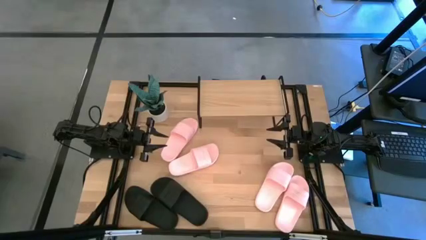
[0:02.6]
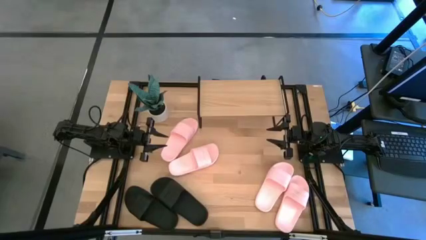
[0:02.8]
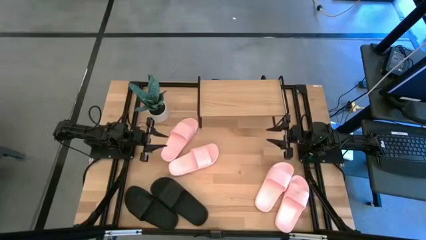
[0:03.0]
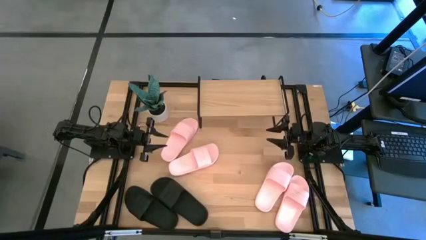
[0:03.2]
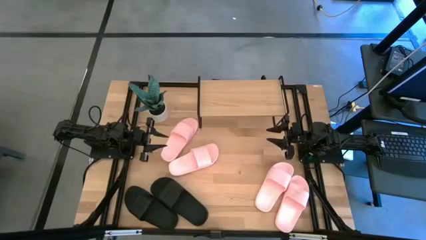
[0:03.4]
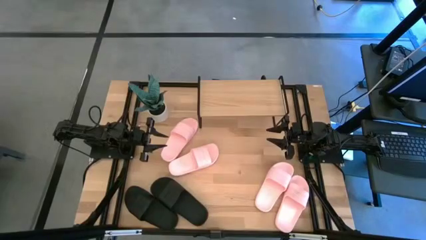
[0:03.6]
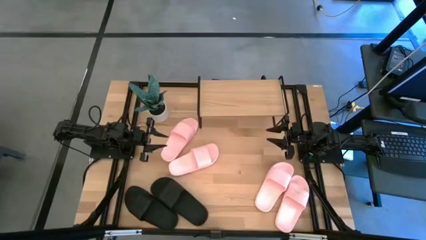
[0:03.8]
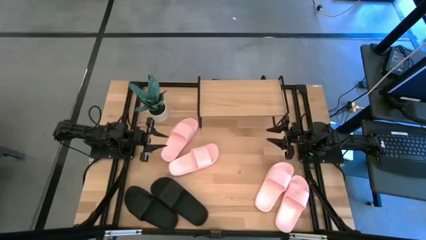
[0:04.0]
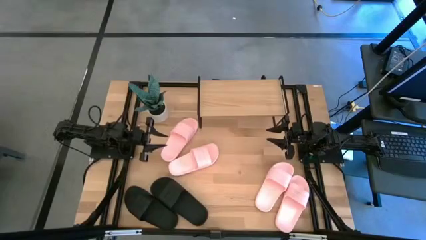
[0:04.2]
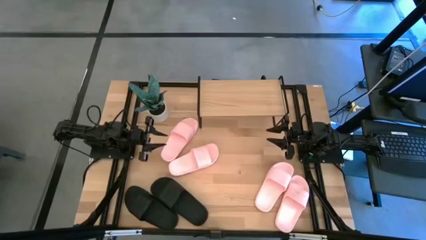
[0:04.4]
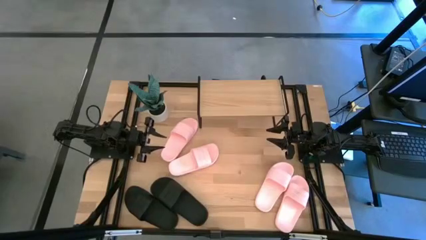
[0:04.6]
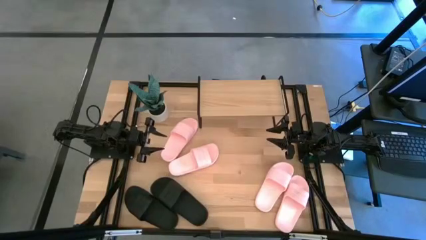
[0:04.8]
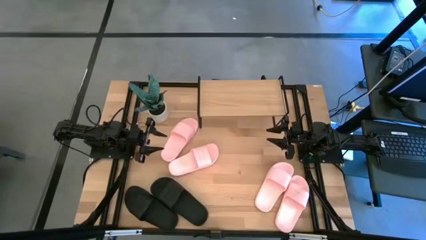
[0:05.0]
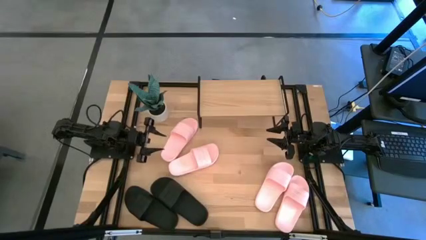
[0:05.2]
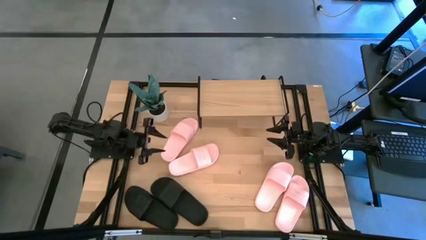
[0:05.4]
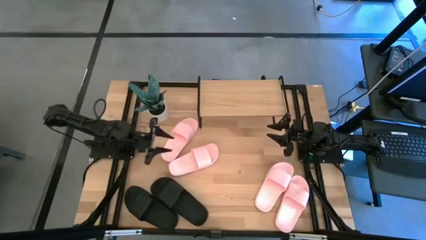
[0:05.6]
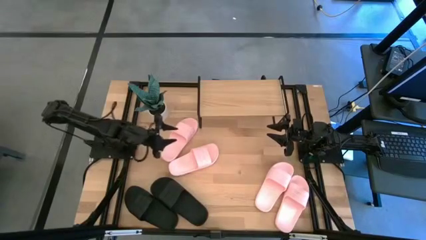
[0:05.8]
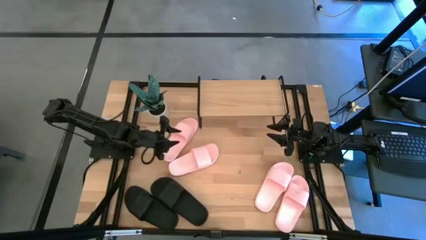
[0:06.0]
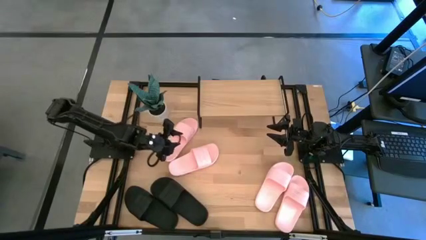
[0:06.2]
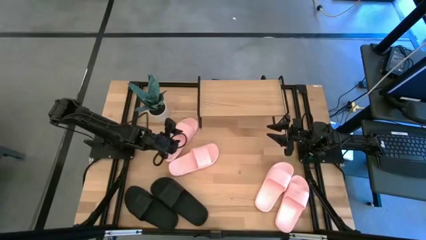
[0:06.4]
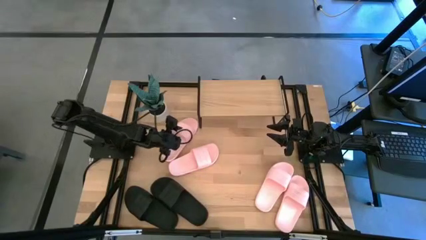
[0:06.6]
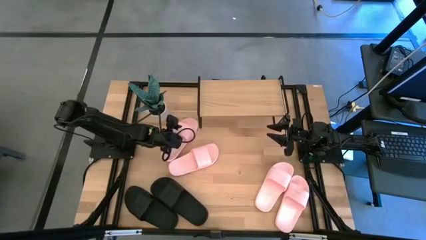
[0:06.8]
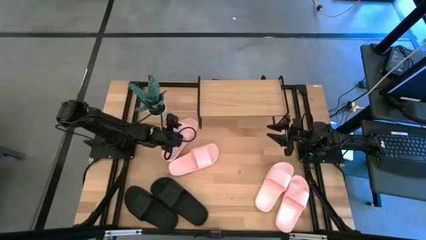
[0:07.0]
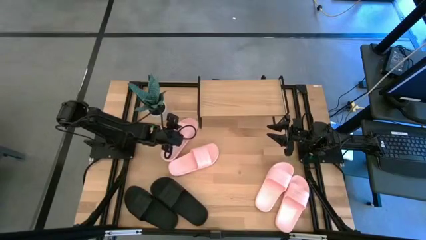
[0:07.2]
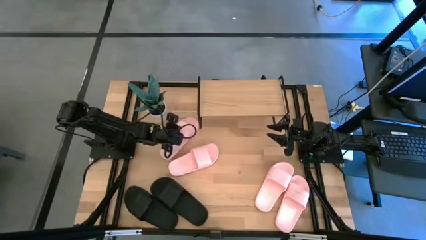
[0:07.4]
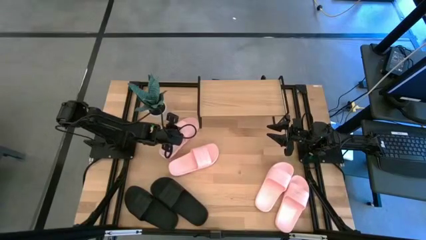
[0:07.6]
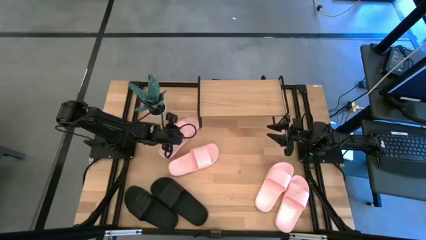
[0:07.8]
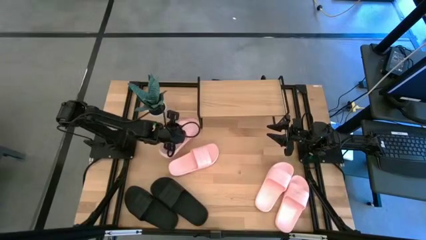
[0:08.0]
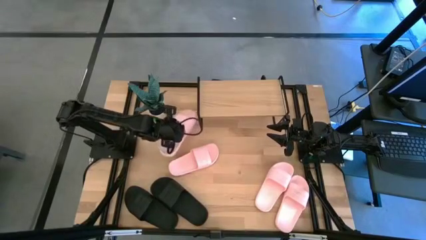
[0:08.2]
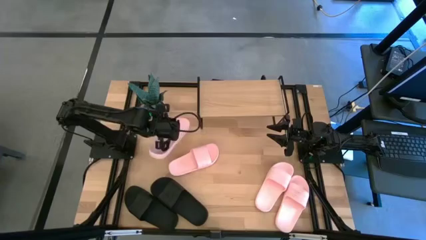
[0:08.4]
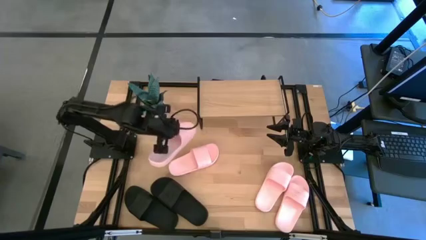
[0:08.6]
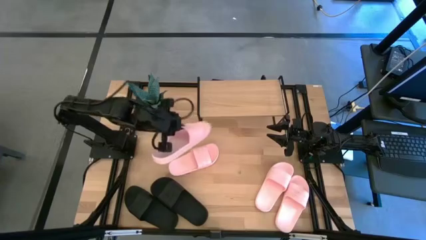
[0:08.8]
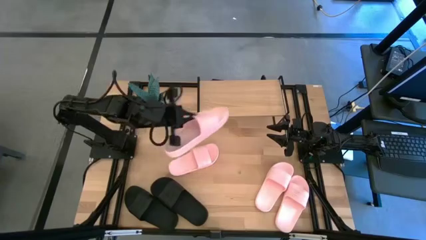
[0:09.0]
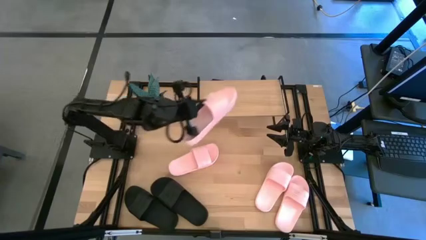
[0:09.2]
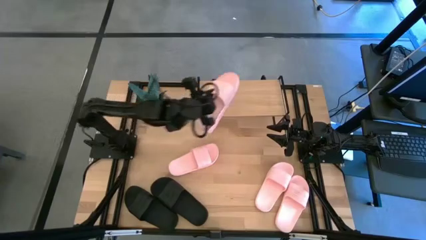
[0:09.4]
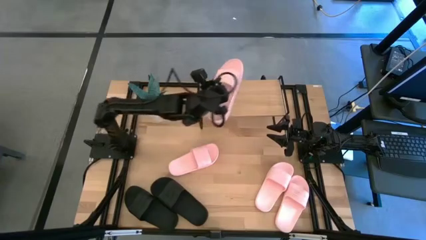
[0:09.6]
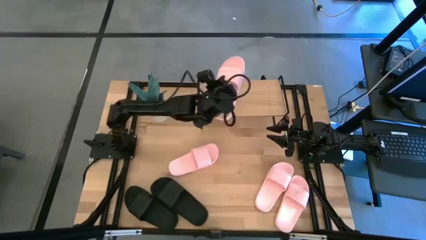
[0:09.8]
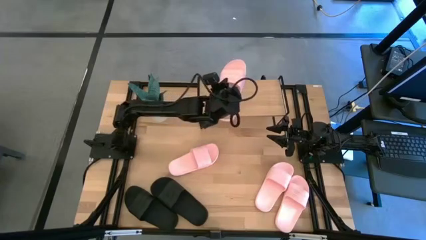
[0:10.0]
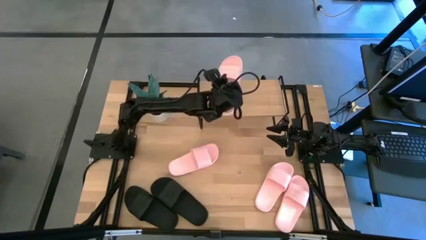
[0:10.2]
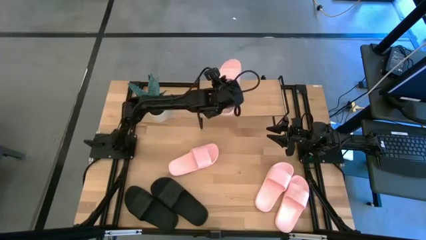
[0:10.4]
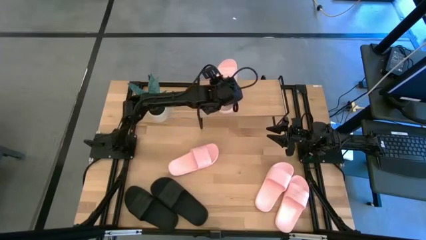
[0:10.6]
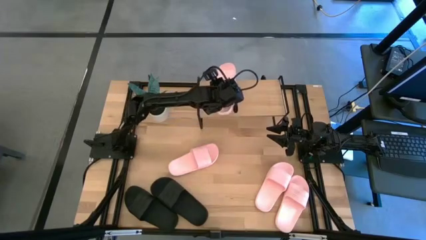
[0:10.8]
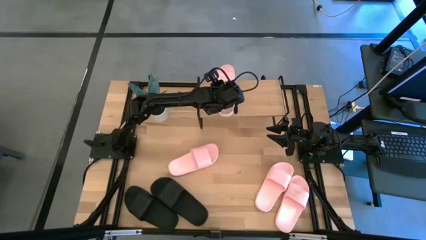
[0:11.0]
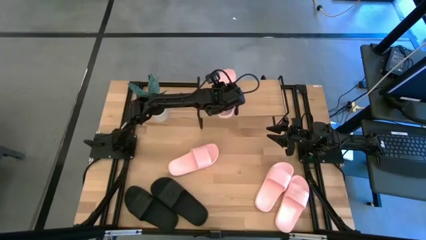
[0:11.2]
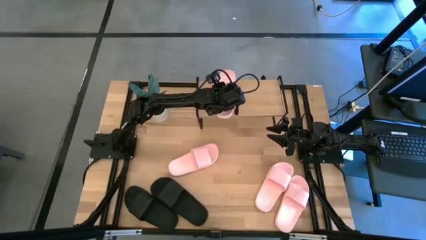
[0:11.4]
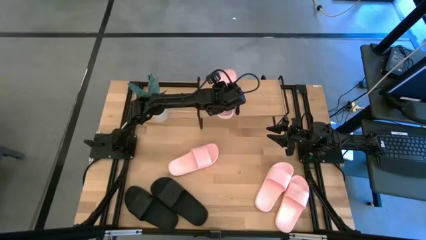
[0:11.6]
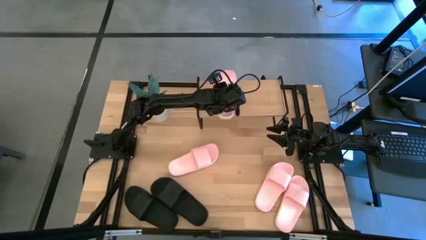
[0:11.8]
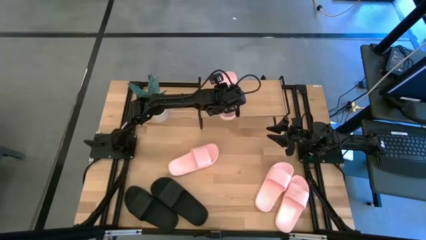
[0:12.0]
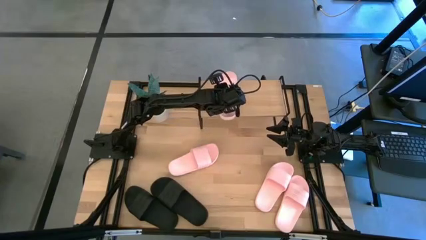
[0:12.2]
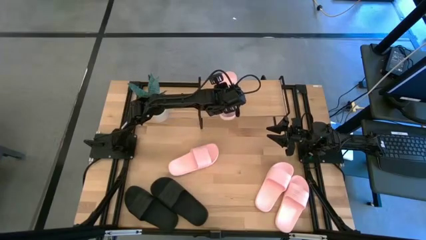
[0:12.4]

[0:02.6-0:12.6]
Task: Pick and place slides into the shelf
Put the pink slipper on the shelf
